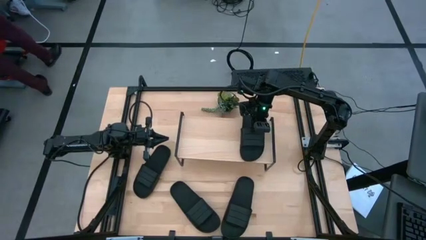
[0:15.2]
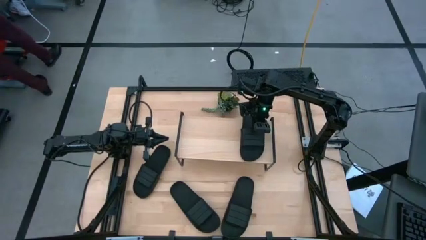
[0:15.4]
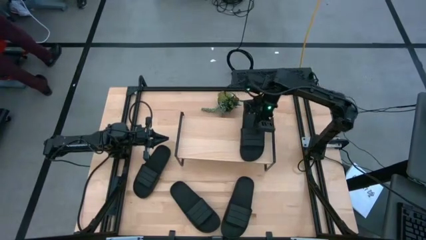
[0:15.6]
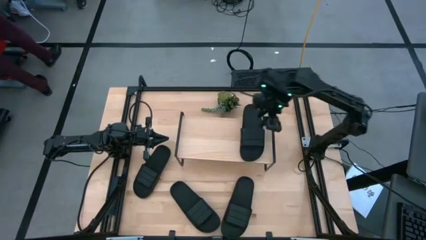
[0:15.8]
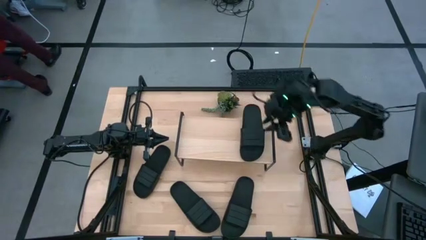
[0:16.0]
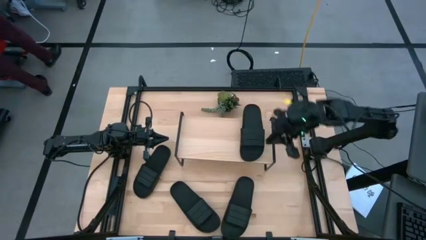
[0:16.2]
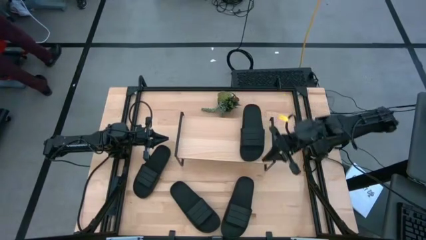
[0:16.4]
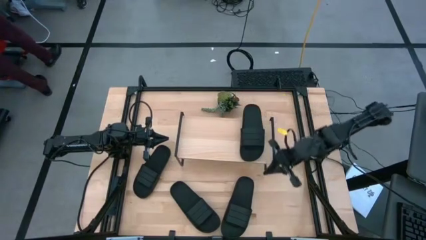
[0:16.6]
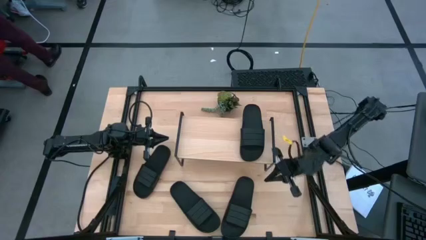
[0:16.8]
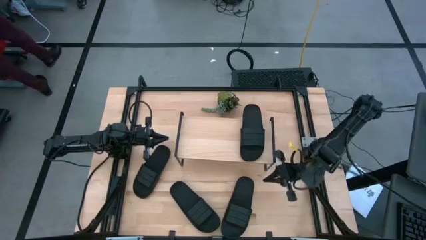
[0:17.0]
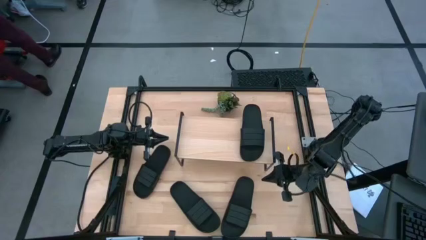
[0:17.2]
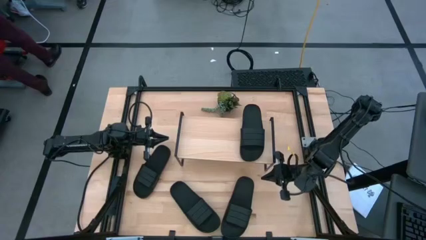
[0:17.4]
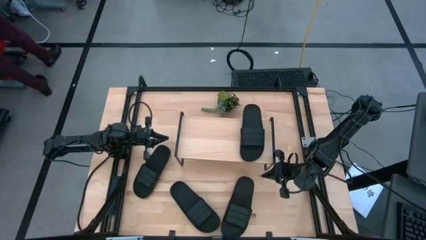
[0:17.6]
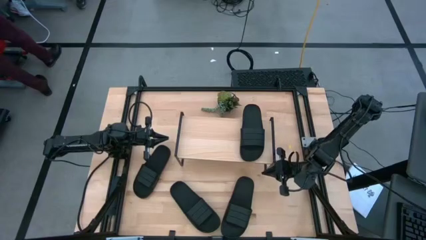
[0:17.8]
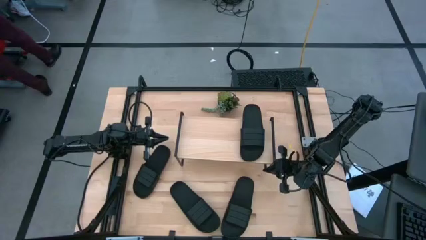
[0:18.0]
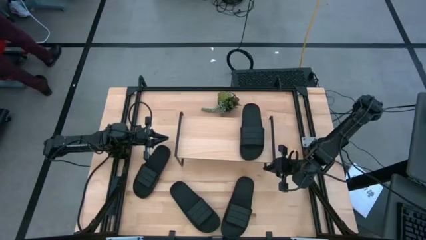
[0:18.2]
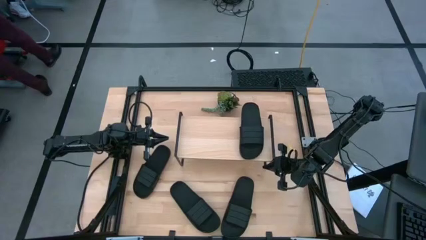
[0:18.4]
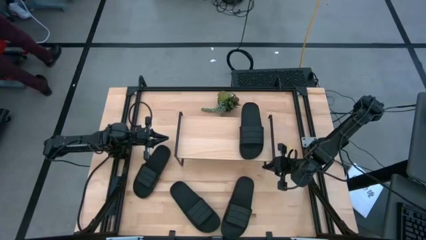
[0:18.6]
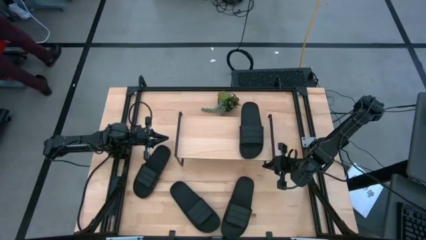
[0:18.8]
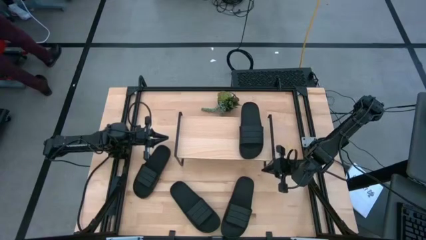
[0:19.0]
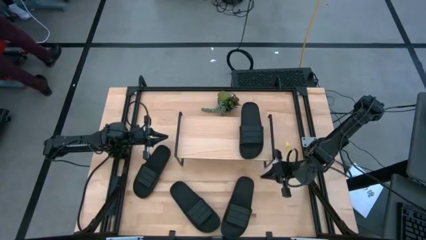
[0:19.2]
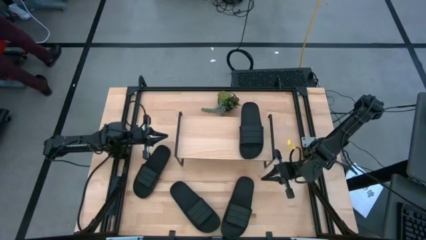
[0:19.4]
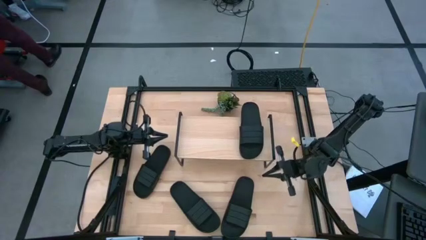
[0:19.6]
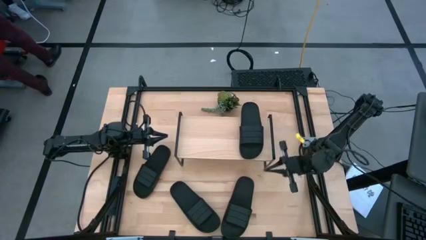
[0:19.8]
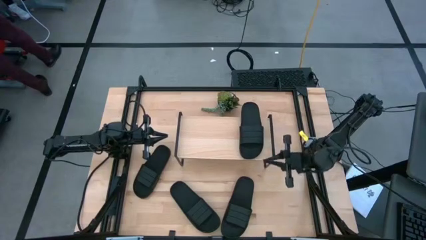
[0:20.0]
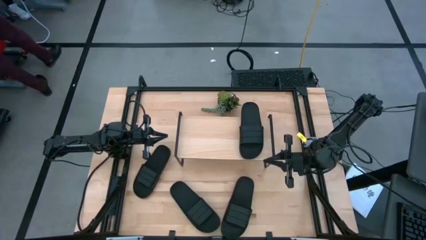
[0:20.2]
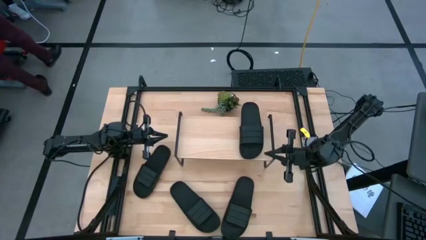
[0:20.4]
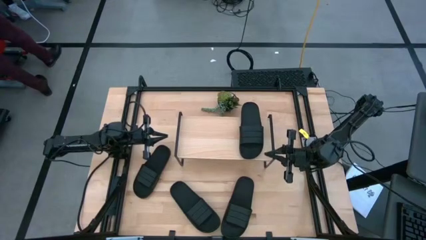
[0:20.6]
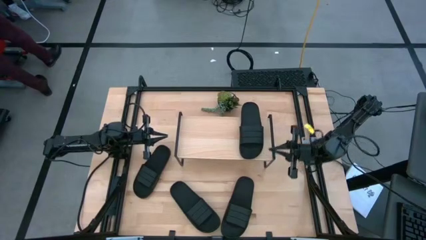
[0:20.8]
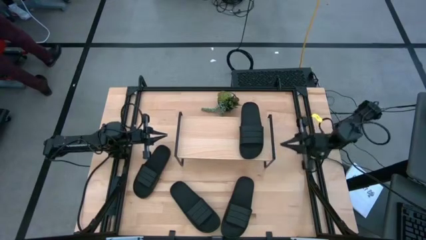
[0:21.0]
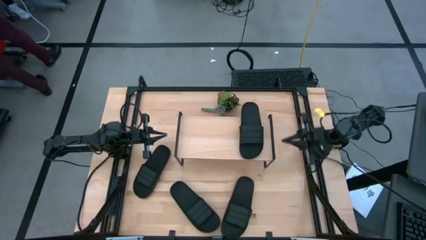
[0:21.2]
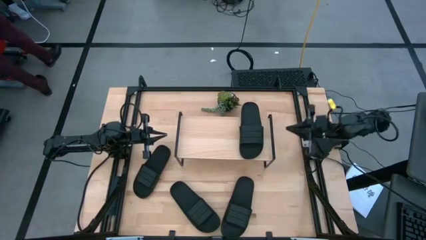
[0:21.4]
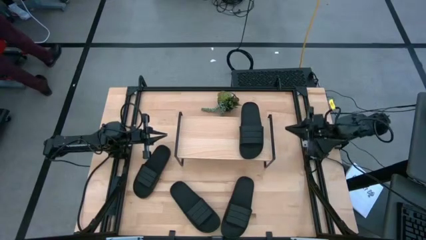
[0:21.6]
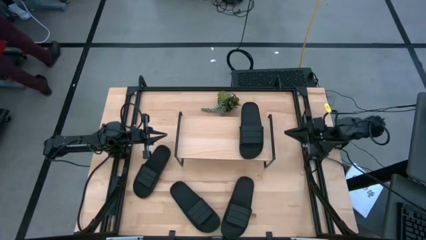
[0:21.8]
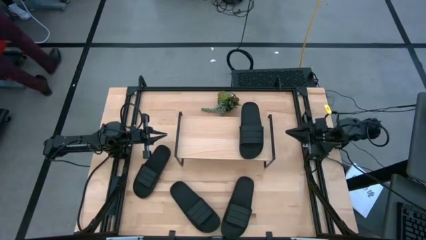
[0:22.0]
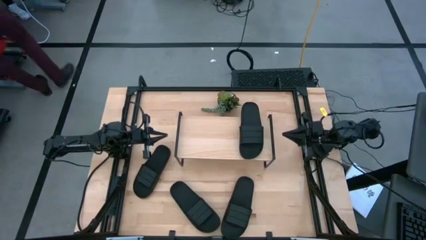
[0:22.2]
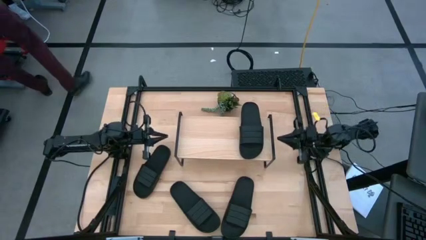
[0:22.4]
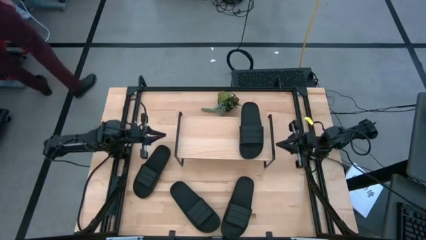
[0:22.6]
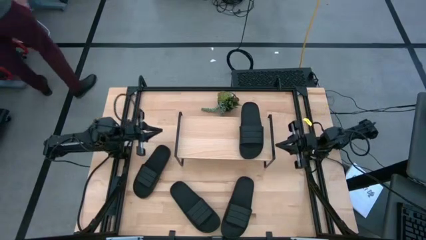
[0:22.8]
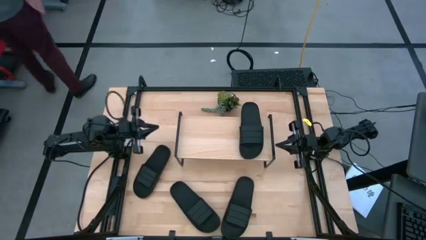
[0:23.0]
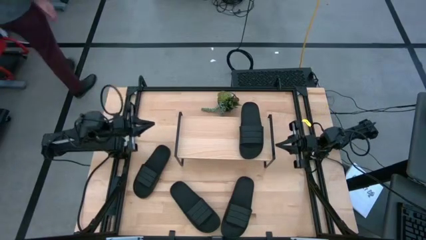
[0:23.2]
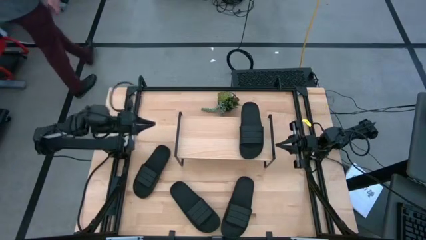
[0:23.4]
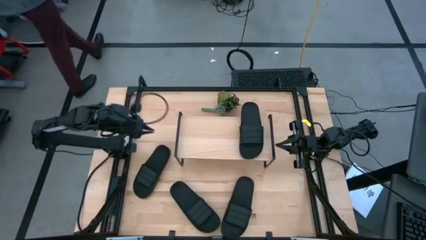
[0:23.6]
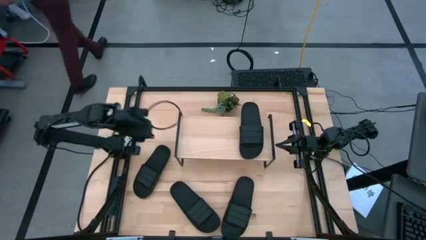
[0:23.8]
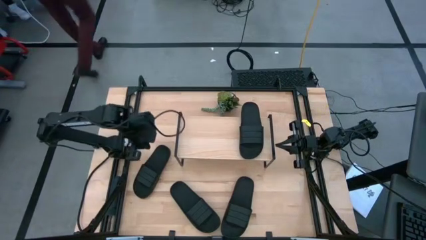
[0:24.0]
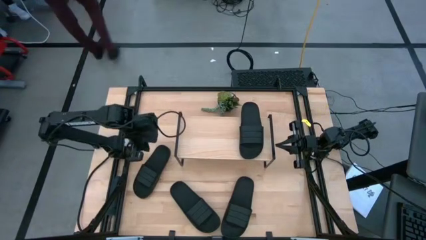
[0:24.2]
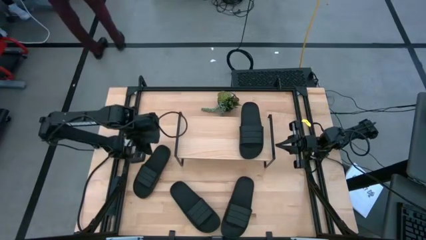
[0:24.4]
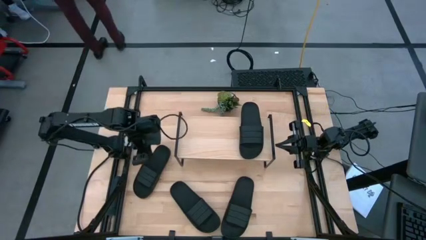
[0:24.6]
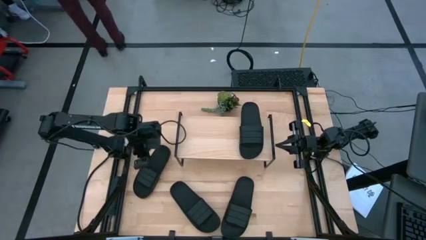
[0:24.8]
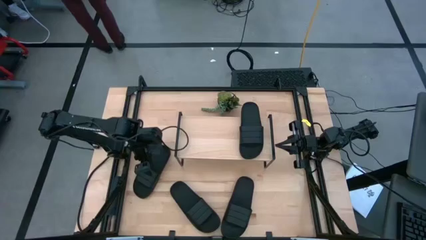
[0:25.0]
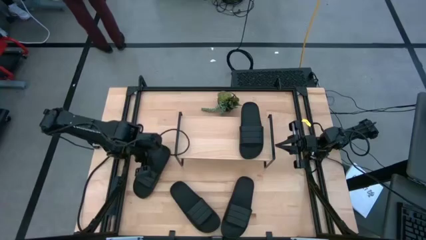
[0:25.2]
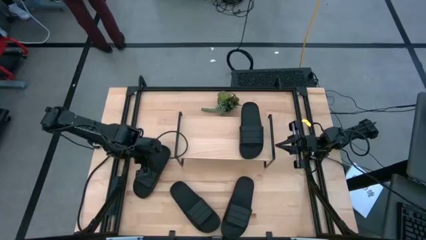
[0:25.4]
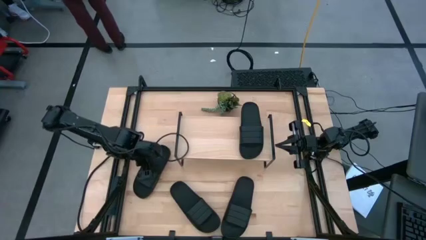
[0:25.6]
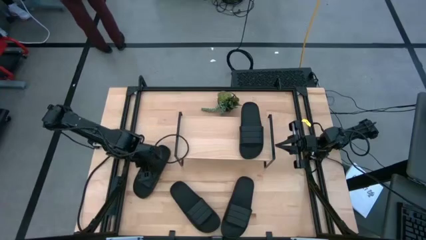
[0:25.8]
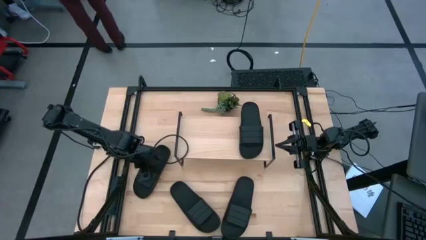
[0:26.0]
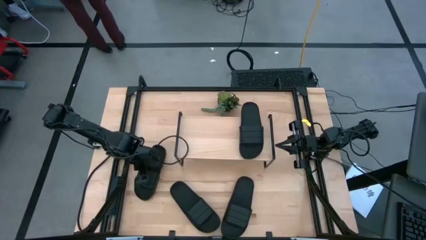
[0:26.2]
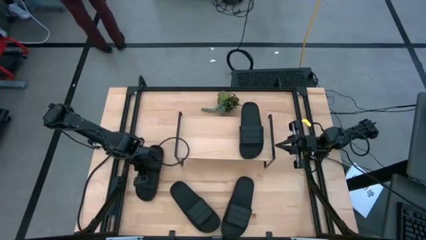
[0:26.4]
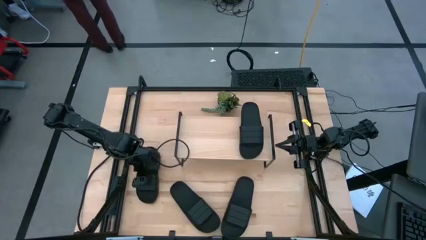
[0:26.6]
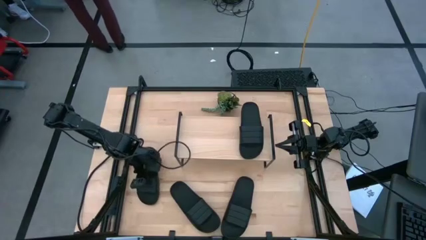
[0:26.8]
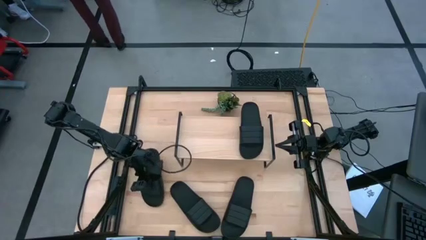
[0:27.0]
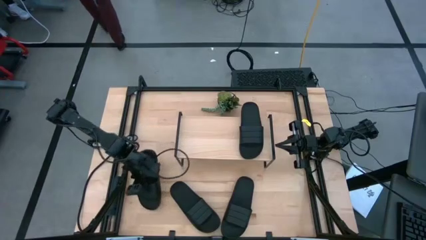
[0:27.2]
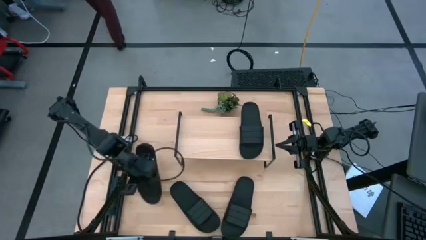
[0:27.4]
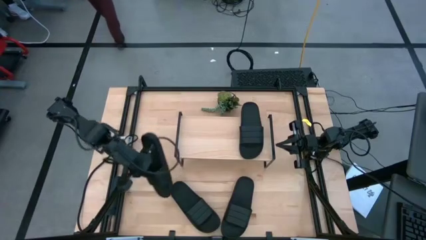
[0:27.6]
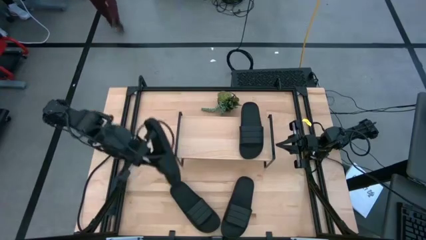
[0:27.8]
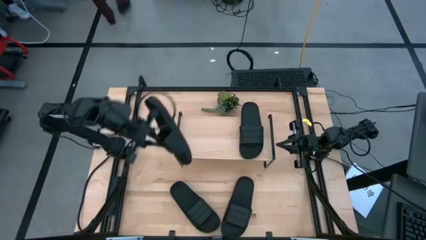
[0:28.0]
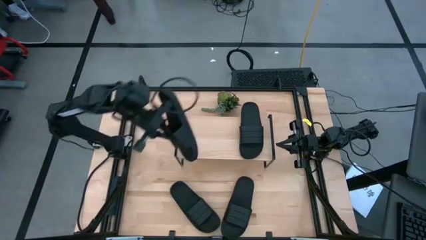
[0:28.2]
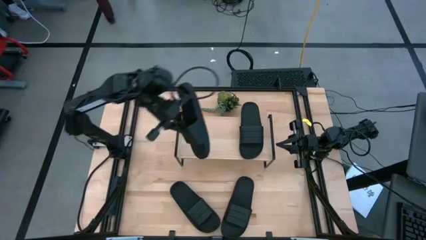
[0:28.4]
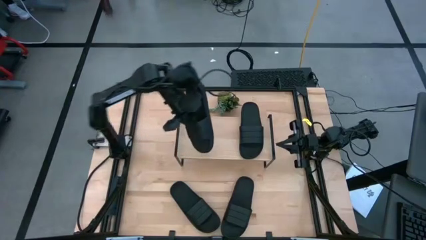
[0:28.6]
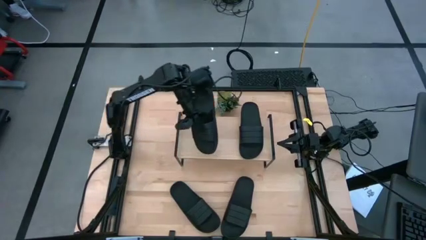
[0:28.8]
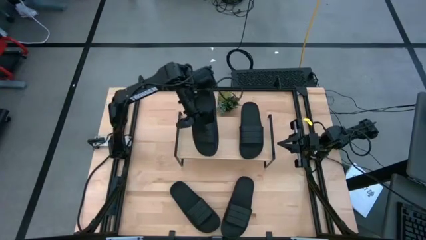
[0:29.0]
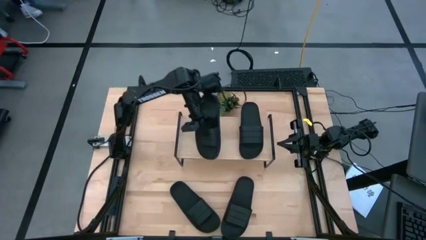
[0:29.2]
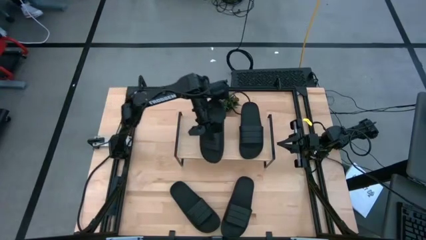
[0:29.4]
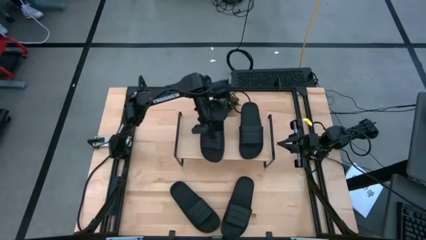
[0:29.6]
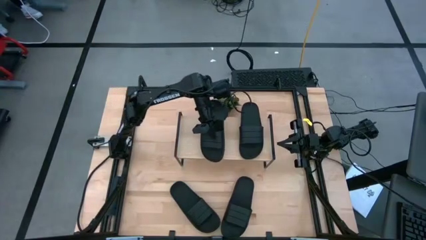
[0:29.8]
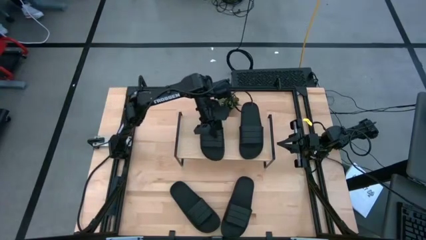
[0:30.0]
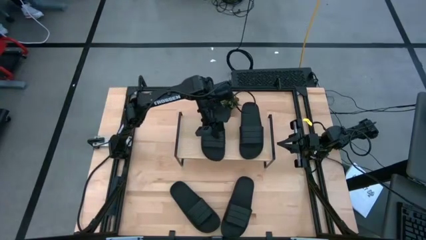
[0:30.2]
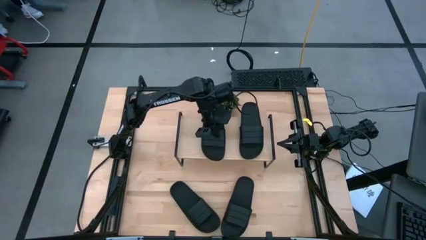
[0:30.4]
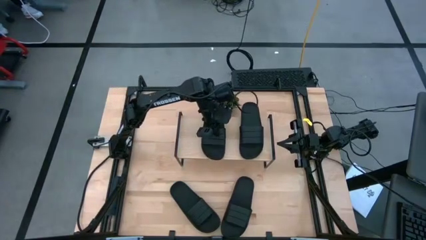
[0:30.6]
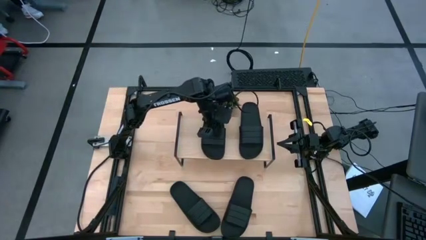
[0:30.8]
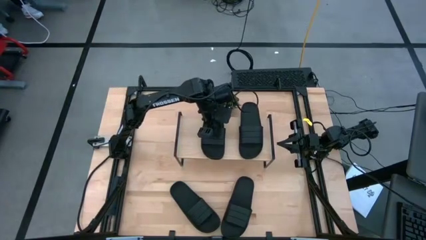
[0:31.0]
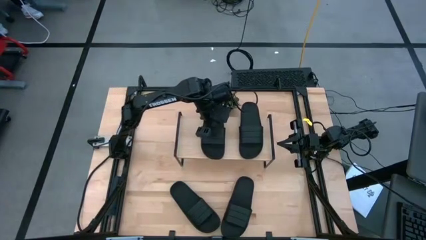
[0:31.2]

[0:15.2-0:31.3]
Task: Pick and place slides into the shelf
Put the black slipper on the shelf
